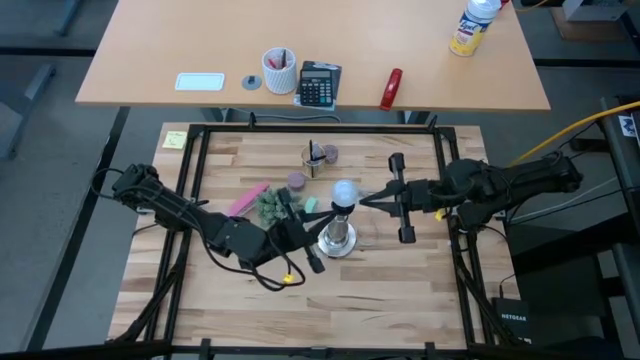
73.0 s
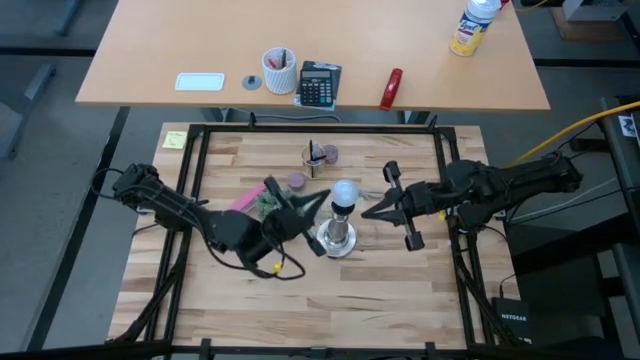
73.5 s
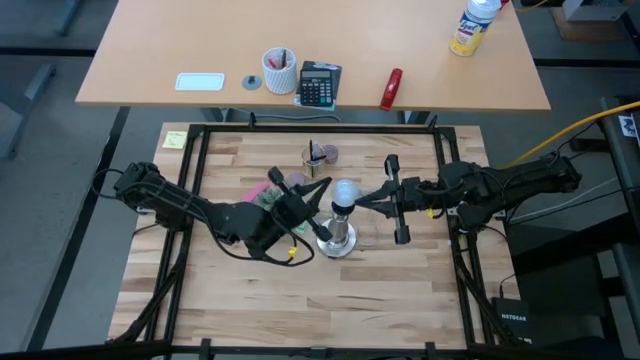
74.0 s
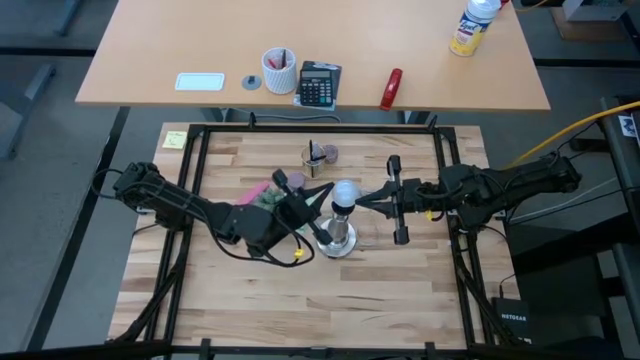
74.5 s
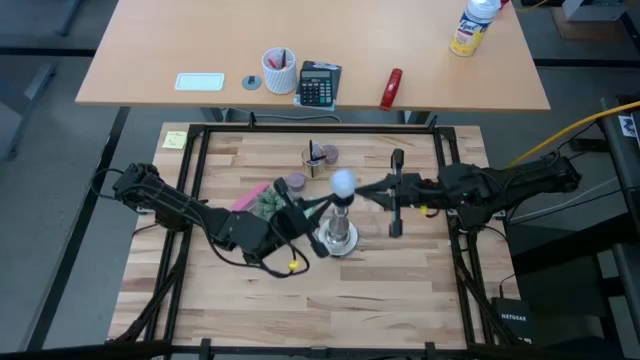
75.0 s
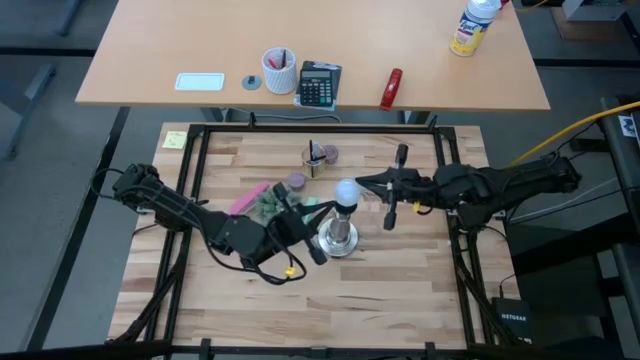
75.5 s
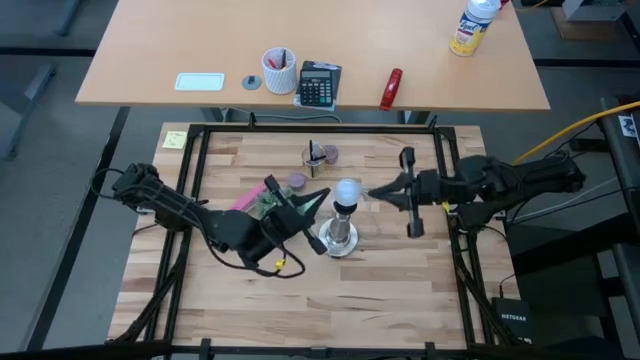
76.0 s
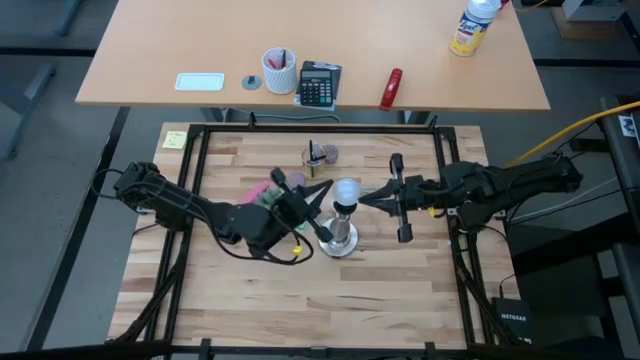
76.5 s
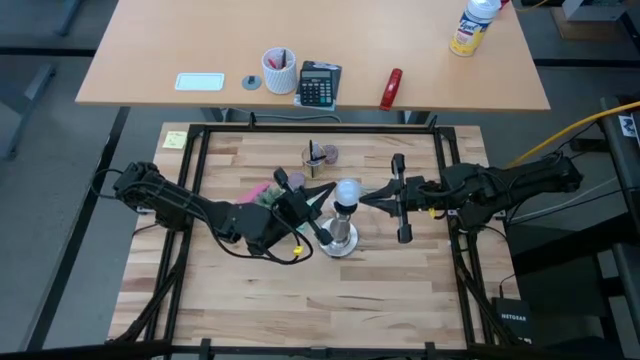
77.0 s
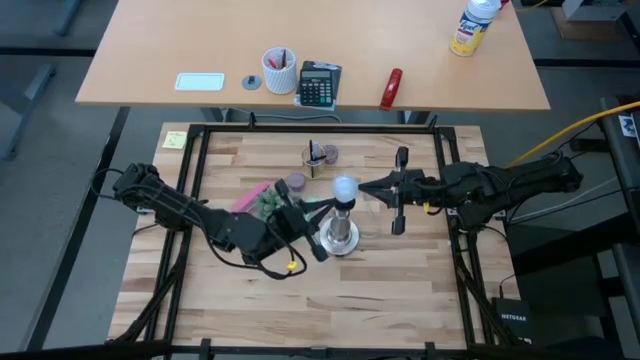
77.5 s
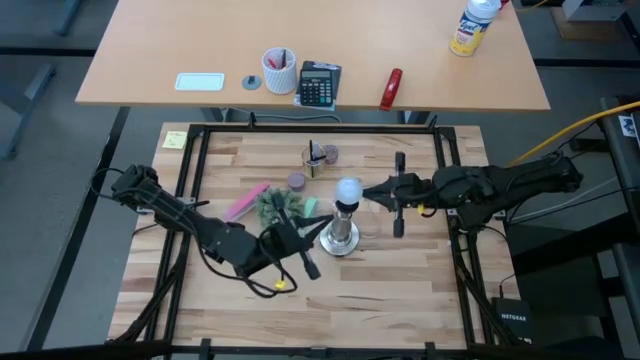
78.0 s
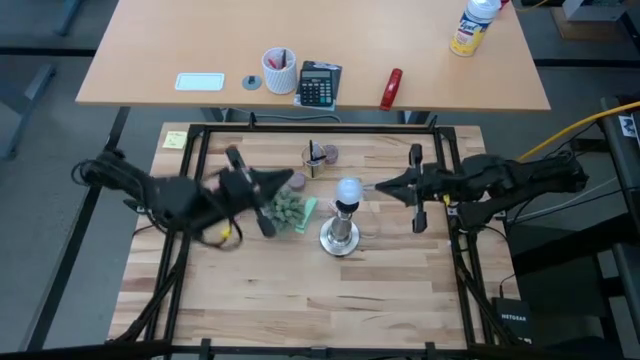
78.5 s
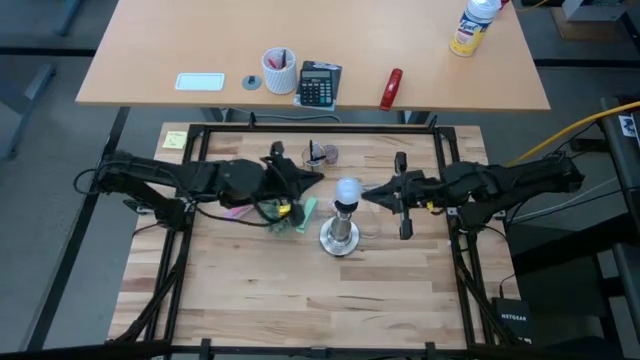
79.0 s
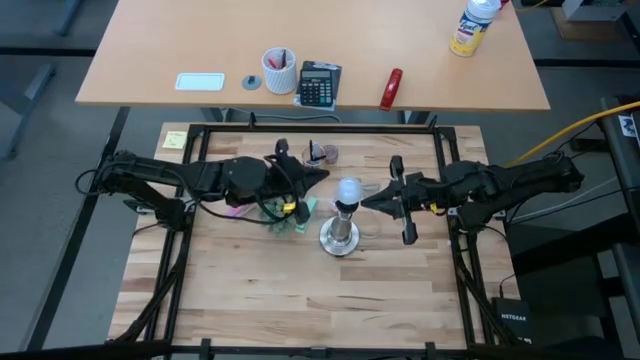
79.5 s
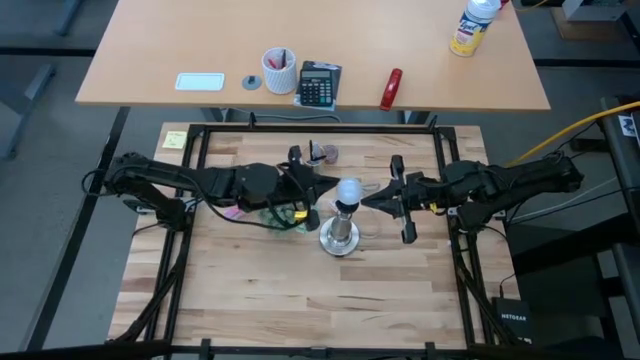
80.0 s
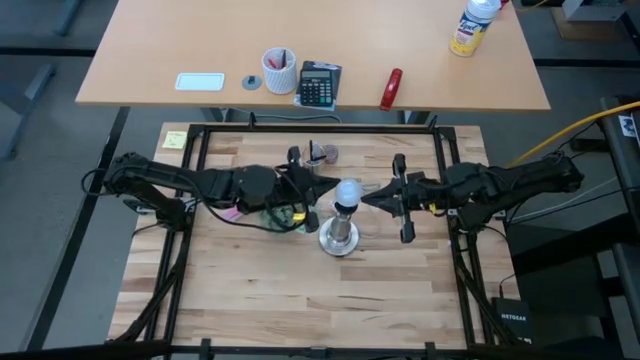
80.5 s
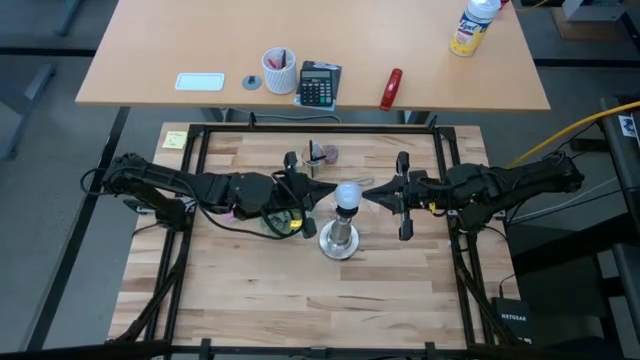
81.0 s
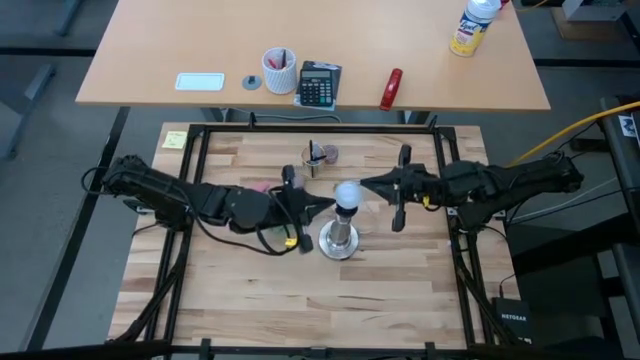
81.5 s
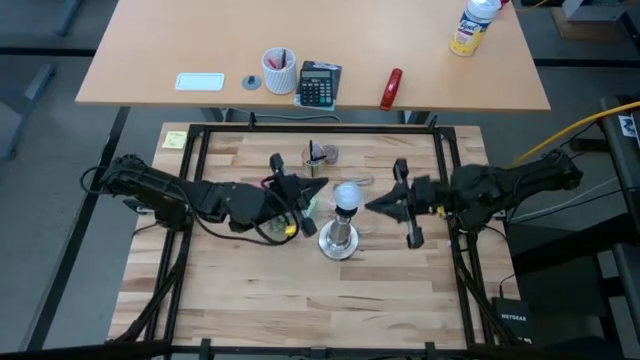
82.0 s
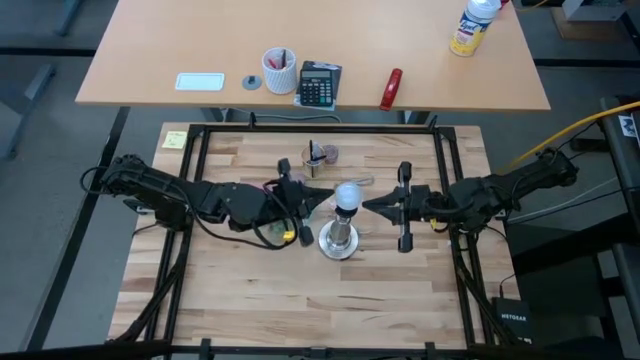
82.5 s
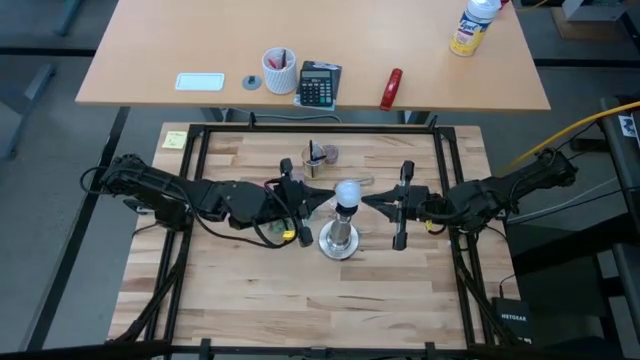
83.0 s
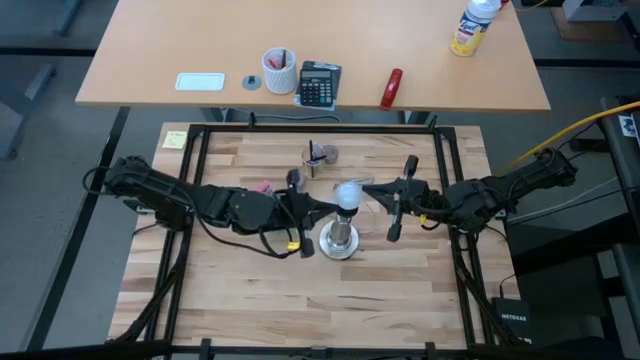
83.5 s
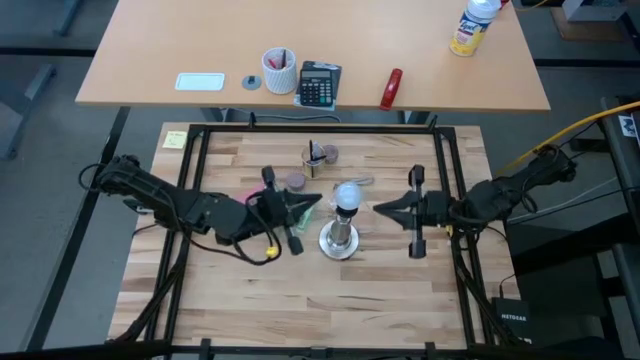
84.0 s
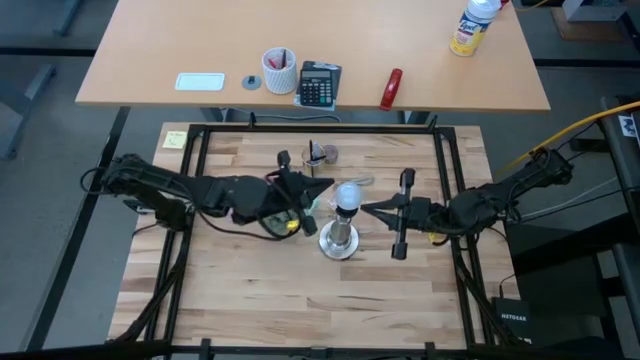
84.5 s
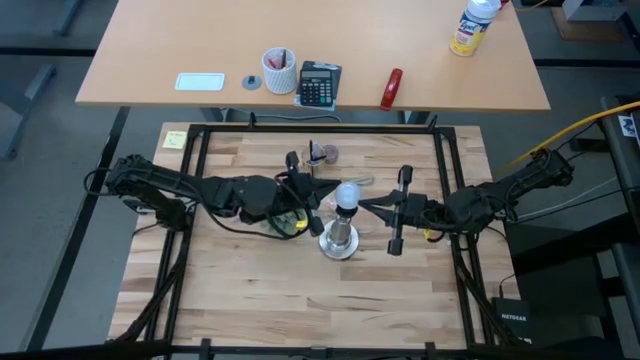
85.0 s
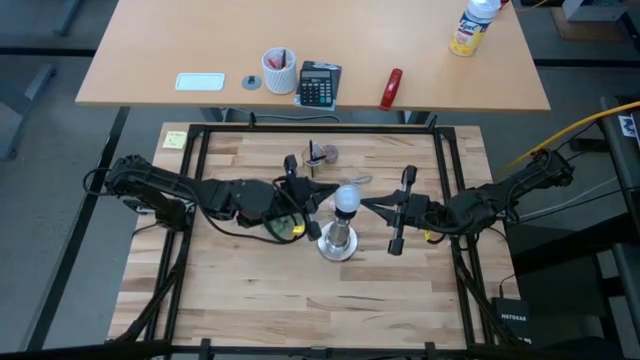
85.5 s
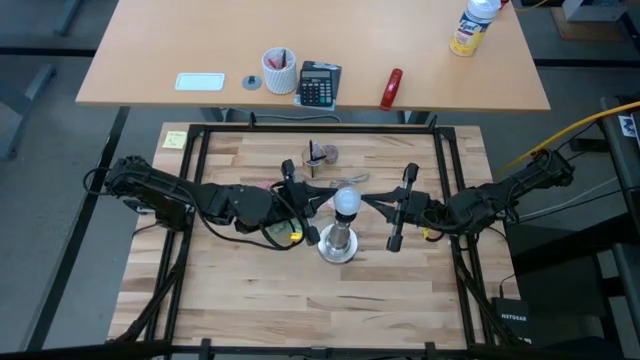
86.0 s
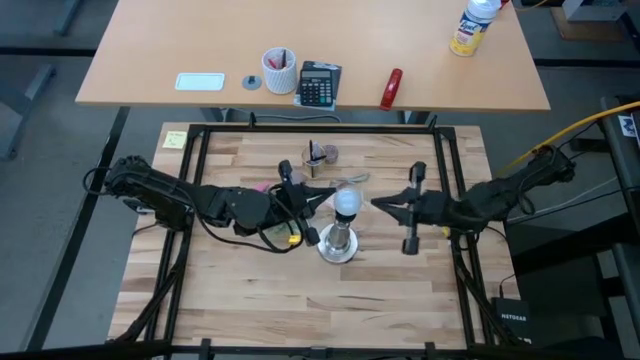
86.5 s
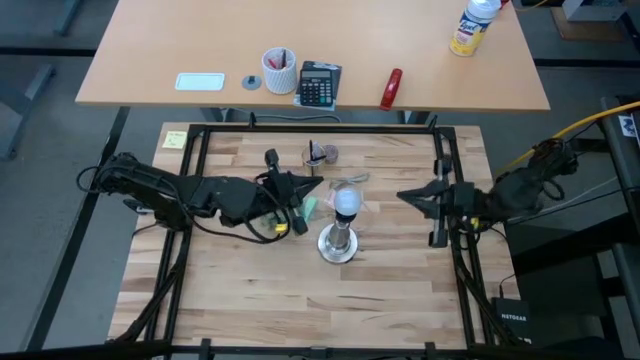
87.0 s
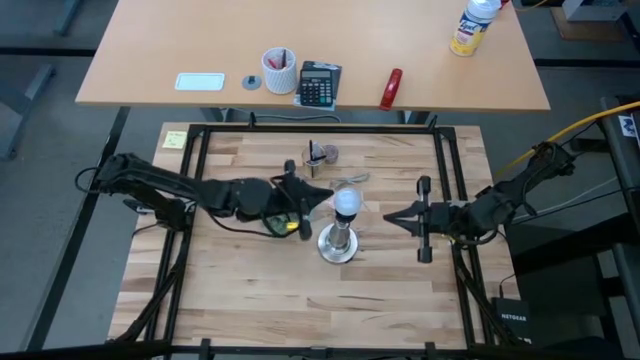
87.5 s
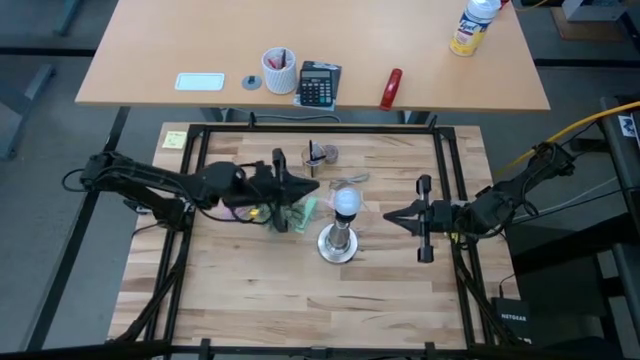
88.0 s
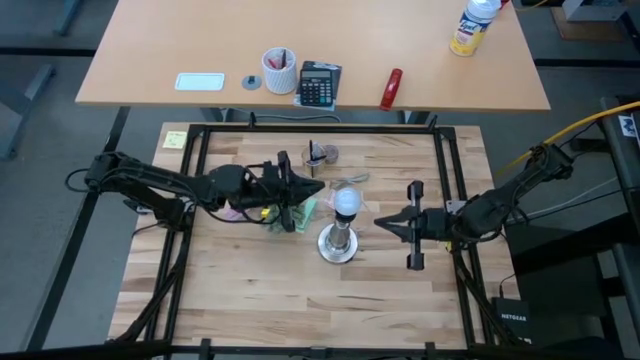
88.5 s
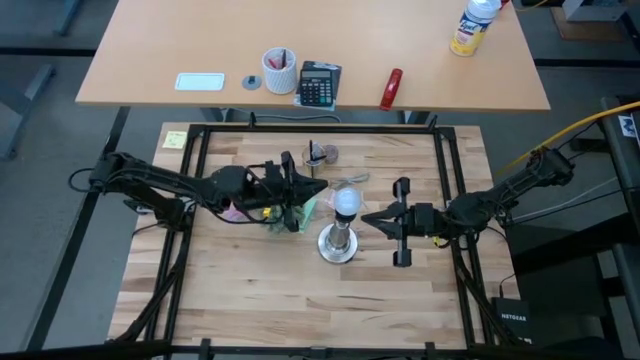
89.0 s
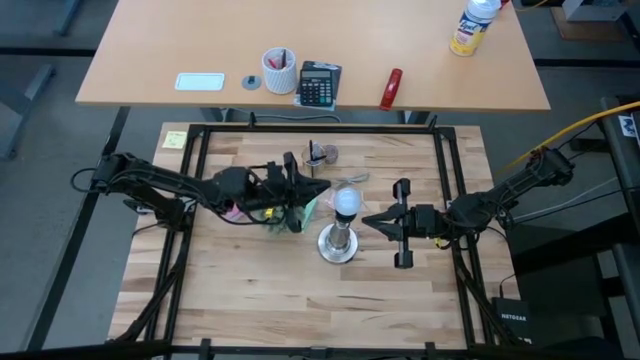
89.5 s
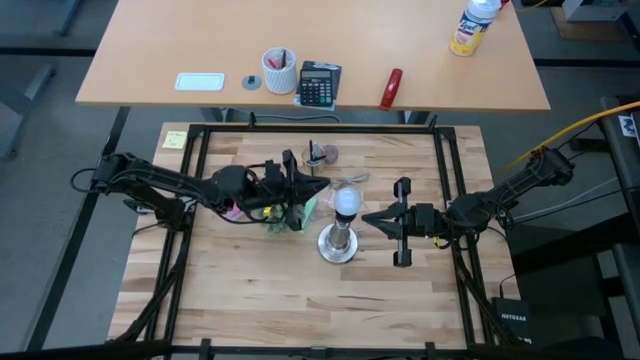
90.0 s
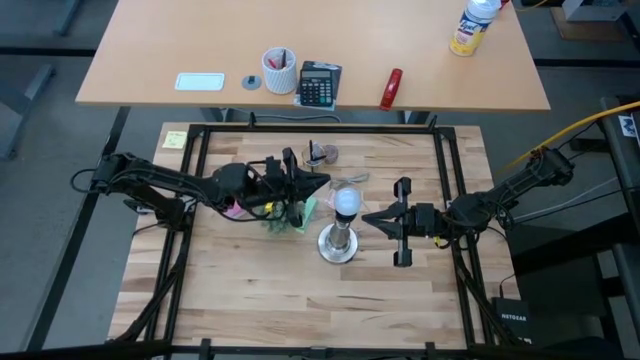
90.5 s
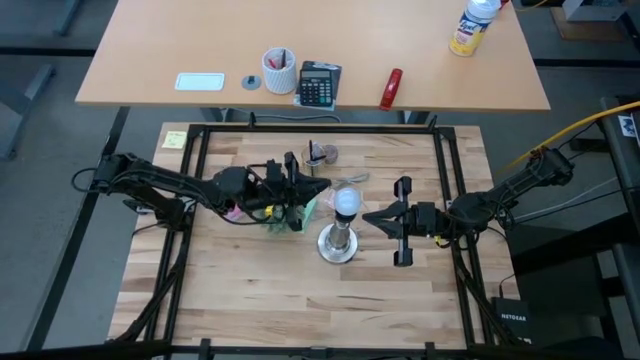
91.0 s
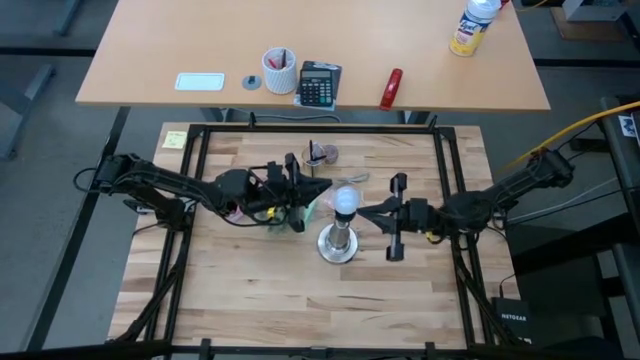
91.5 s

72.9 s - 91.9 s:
Task: Screw lightbulb
Remove the lightbulb from the lamp

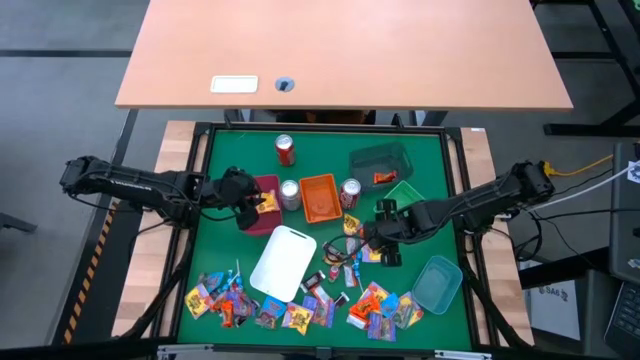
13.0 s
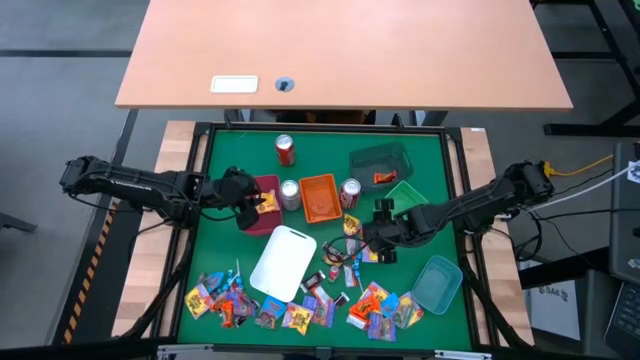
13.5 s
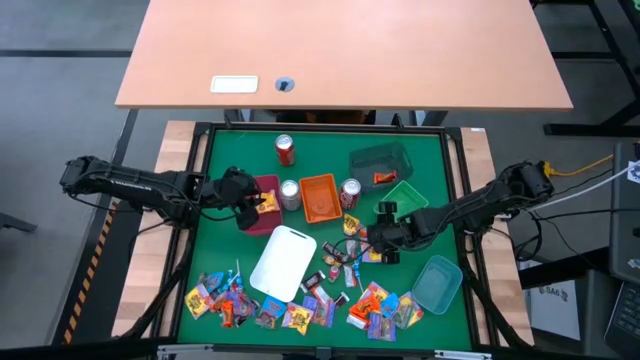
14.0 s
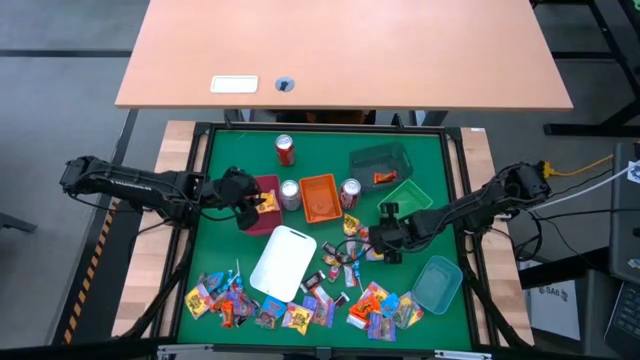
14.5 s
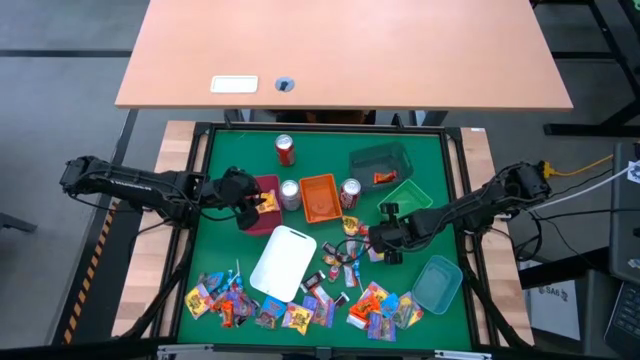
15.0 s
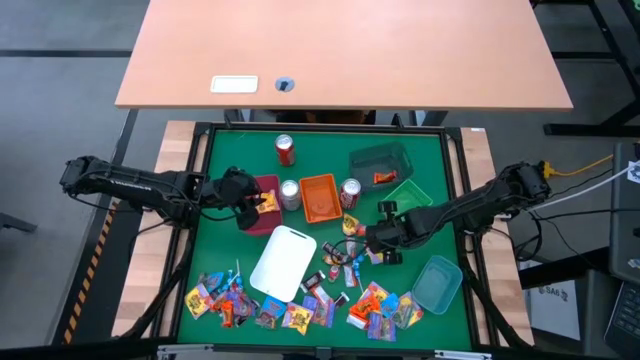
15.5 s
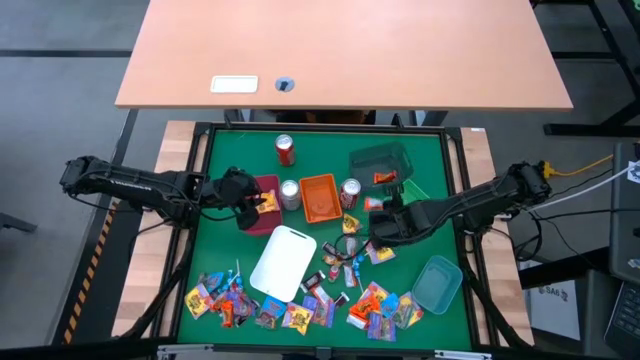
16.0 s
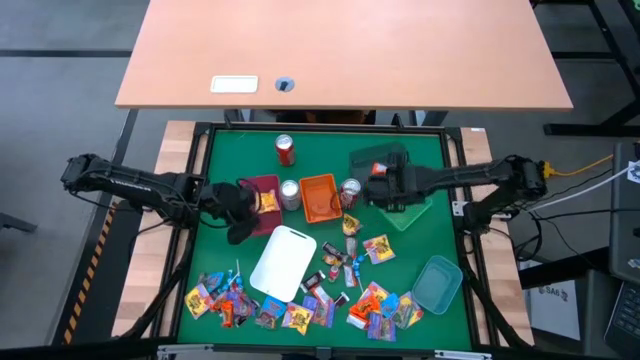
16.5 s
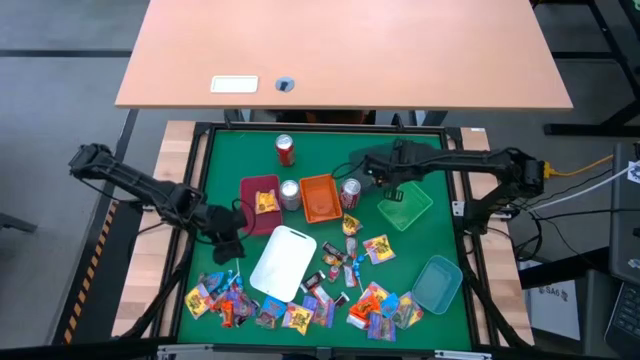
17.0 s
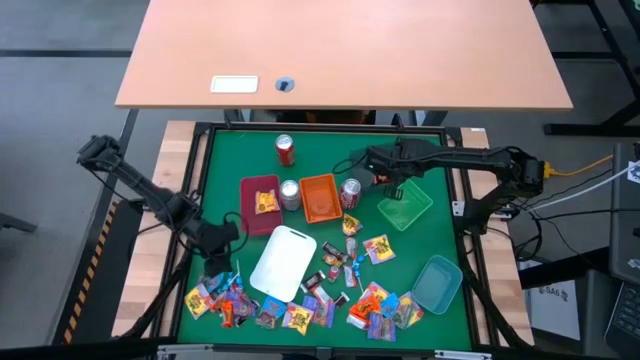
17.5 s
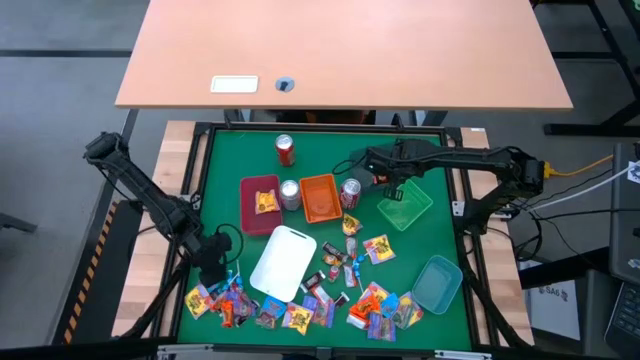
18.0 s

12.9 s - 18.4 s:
Task: Sort candy
Put the orange candy into the black bin
